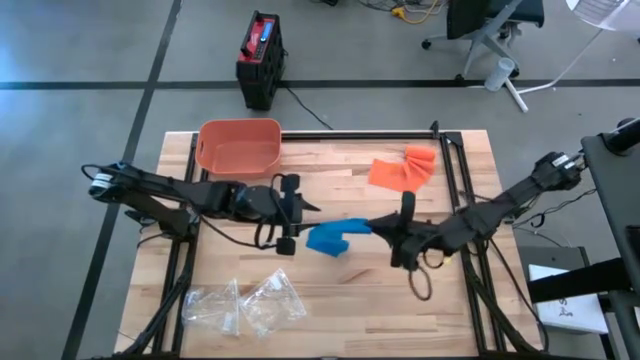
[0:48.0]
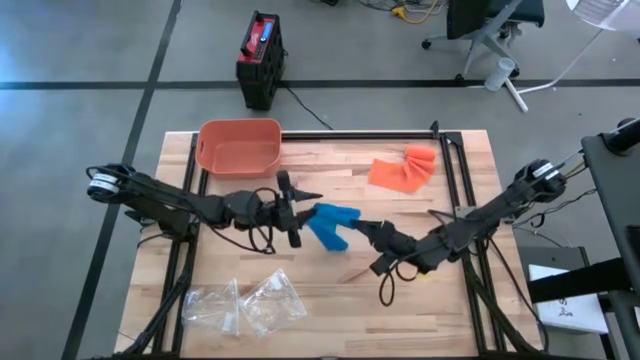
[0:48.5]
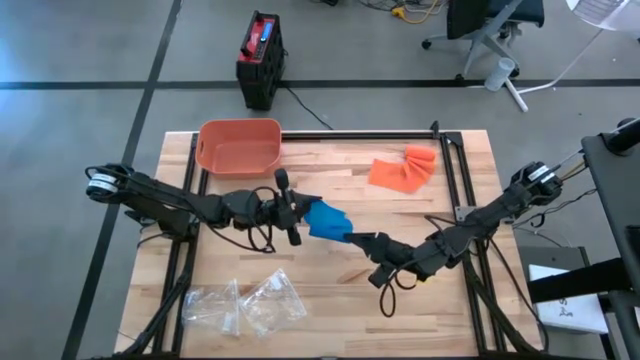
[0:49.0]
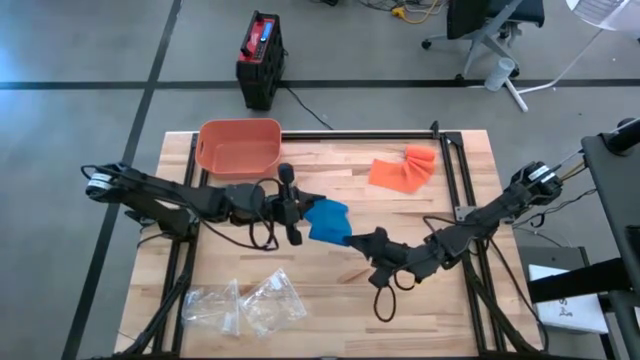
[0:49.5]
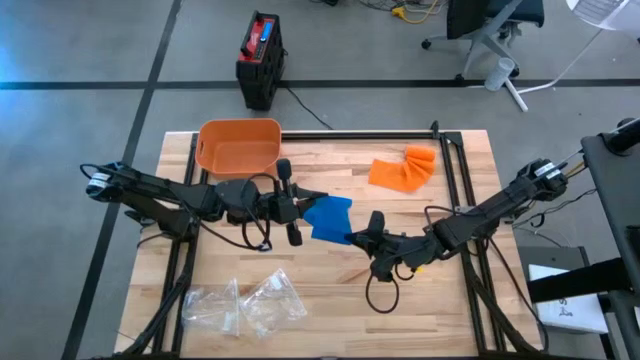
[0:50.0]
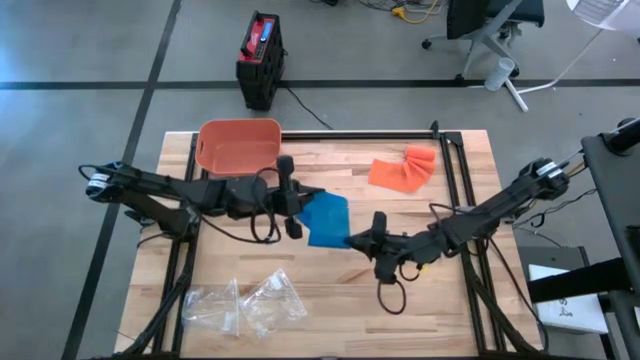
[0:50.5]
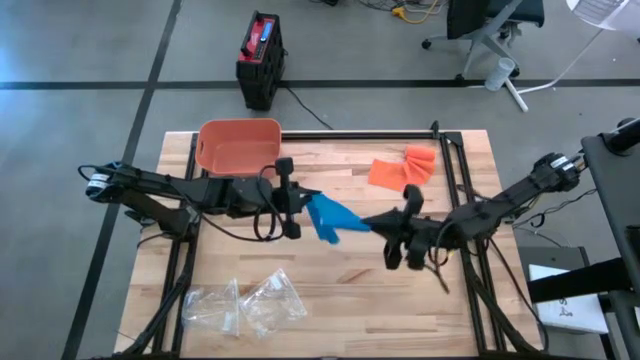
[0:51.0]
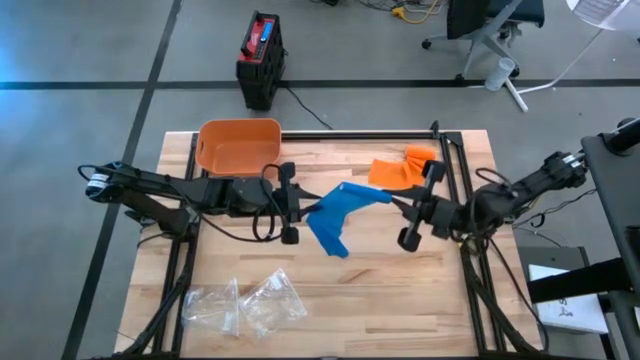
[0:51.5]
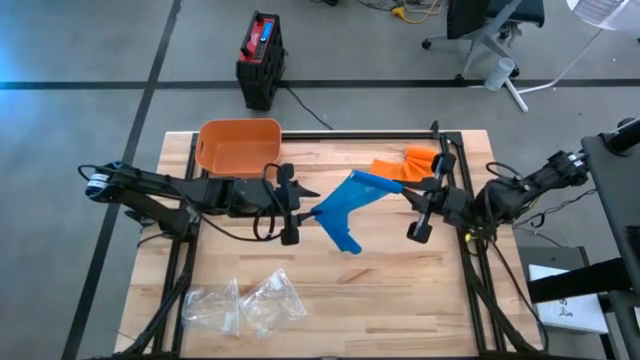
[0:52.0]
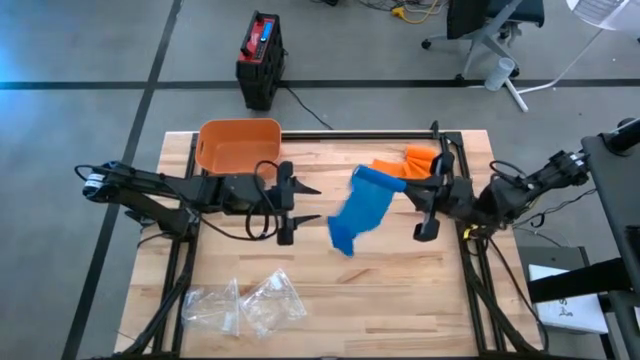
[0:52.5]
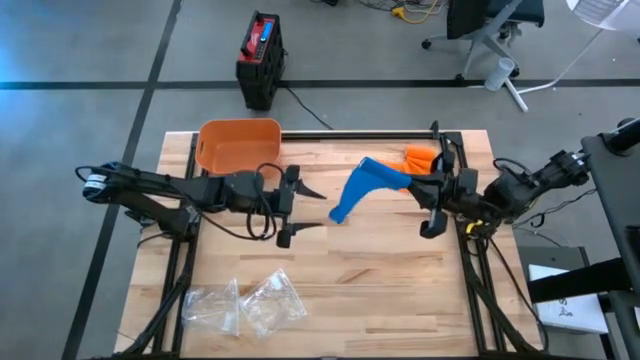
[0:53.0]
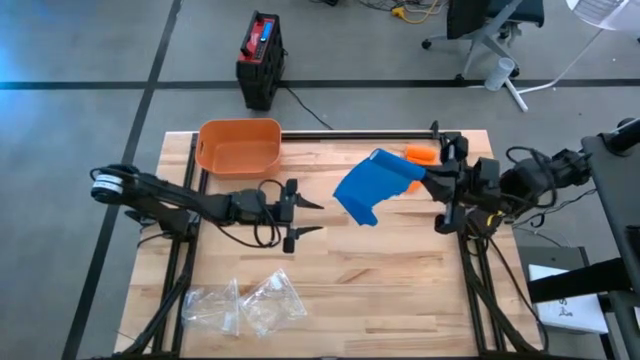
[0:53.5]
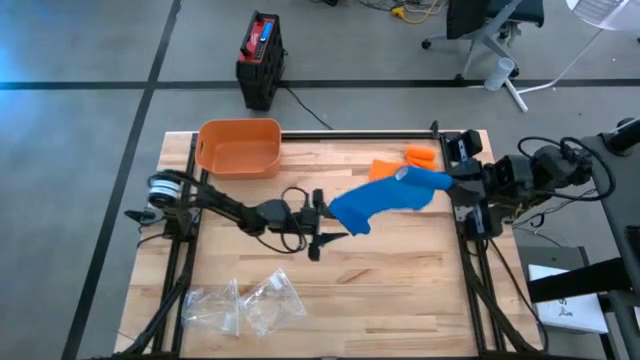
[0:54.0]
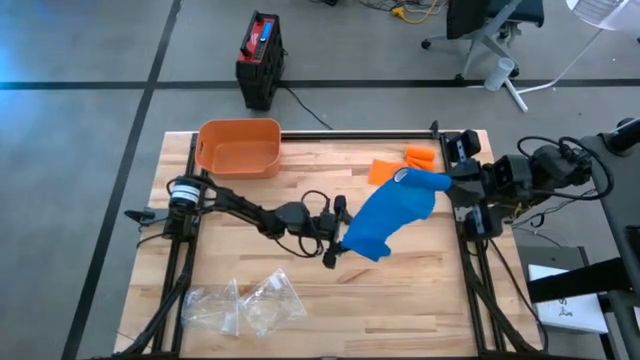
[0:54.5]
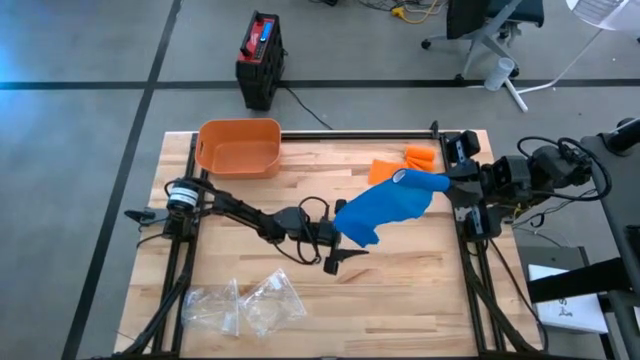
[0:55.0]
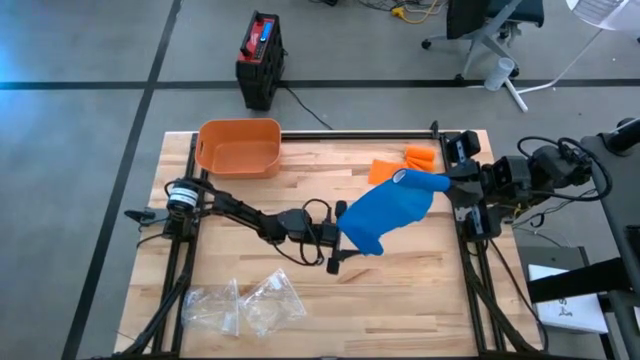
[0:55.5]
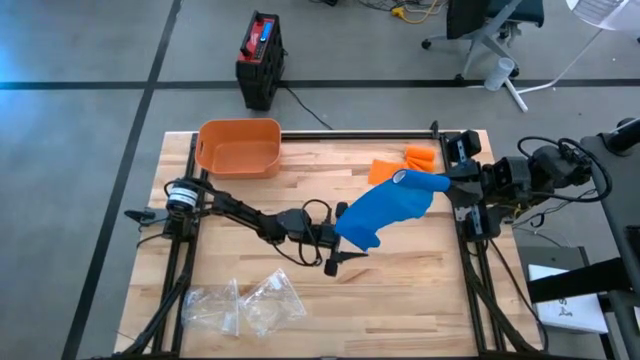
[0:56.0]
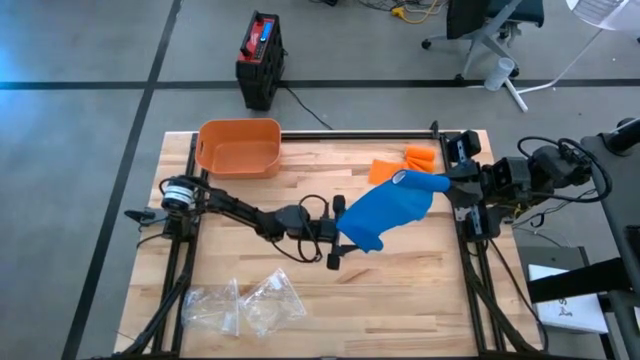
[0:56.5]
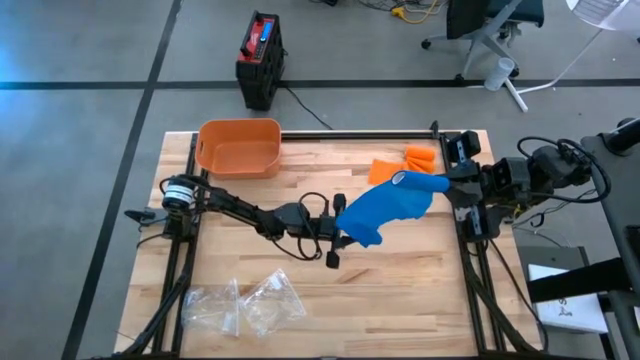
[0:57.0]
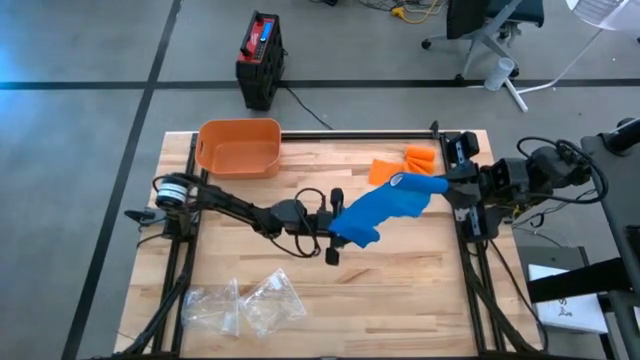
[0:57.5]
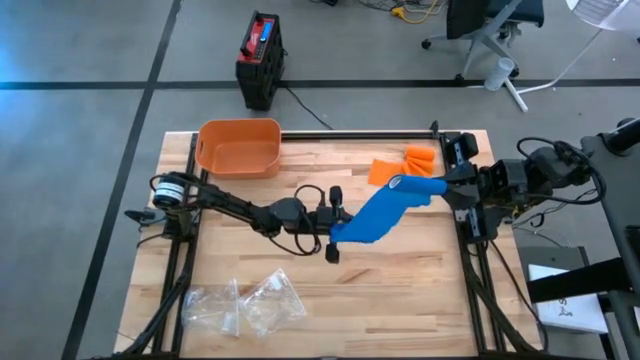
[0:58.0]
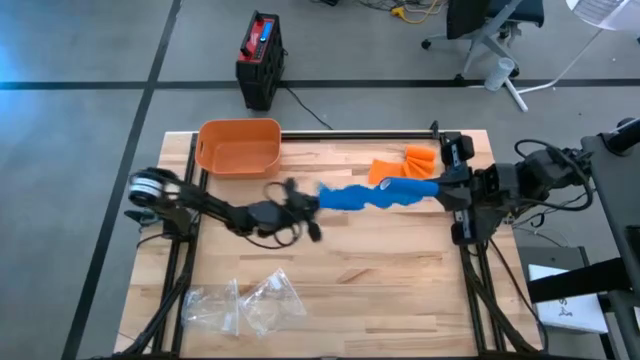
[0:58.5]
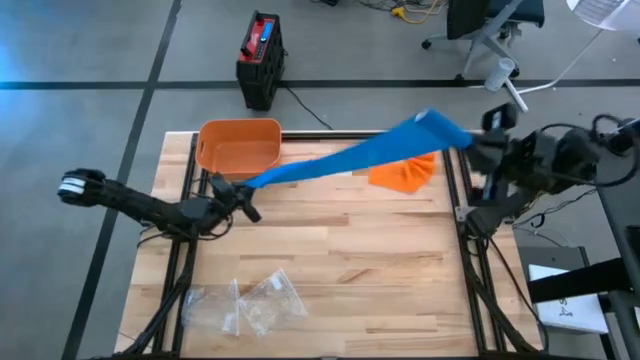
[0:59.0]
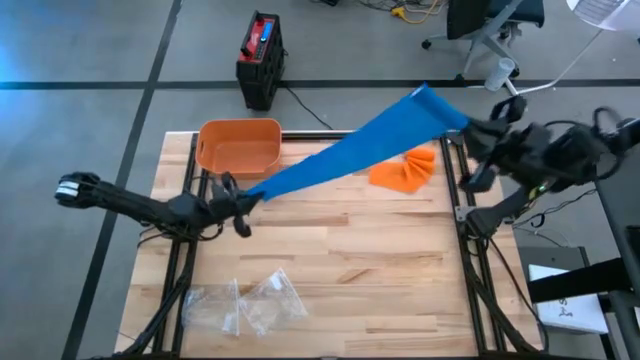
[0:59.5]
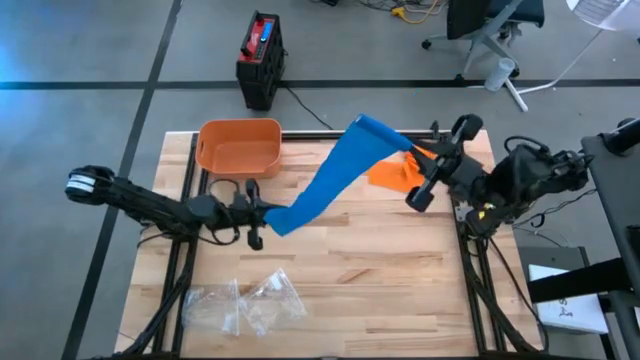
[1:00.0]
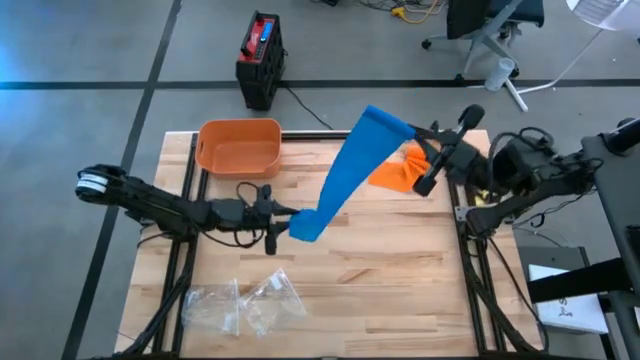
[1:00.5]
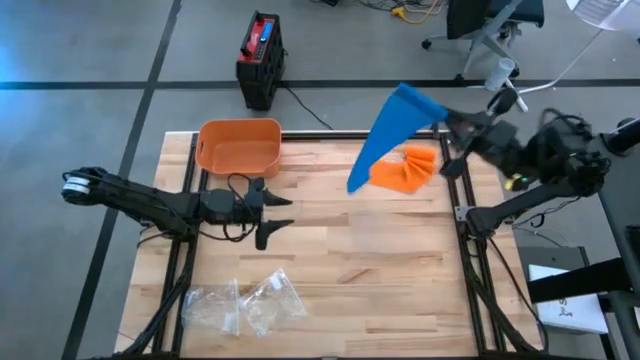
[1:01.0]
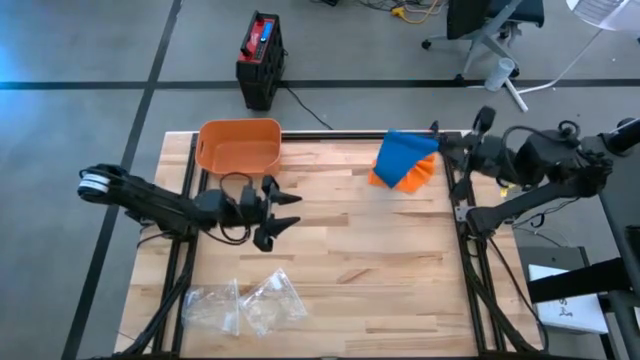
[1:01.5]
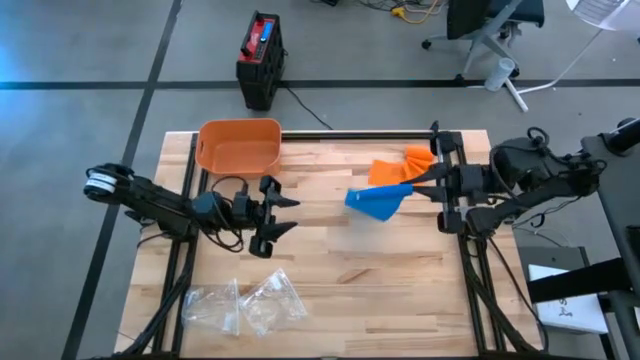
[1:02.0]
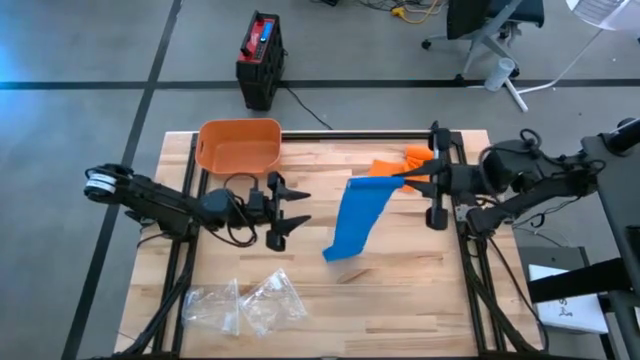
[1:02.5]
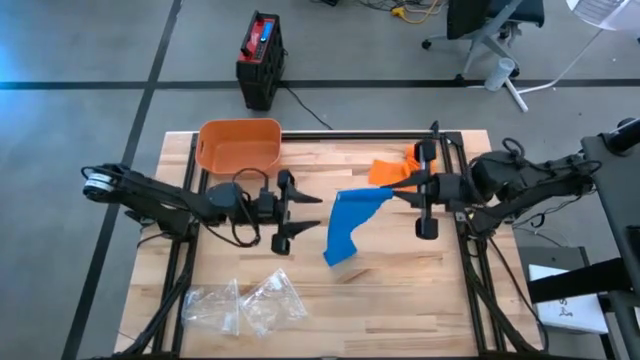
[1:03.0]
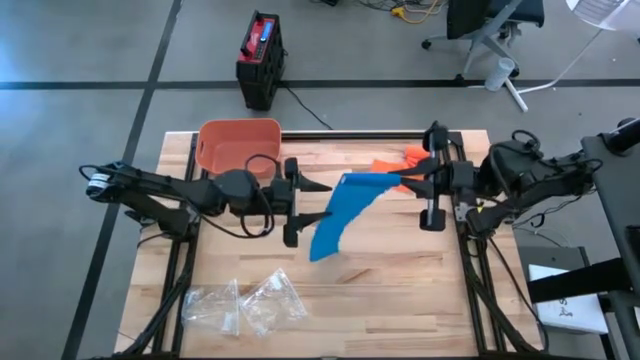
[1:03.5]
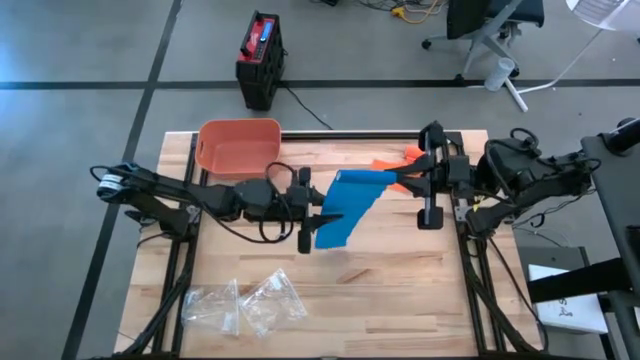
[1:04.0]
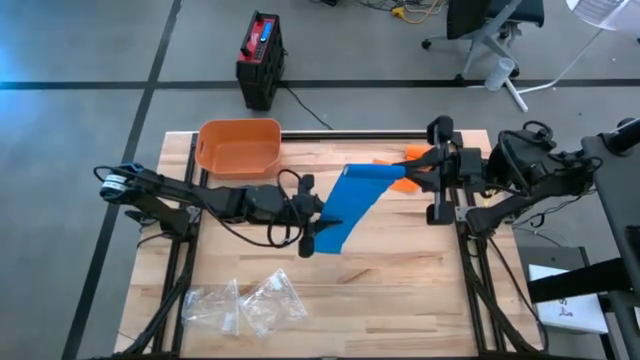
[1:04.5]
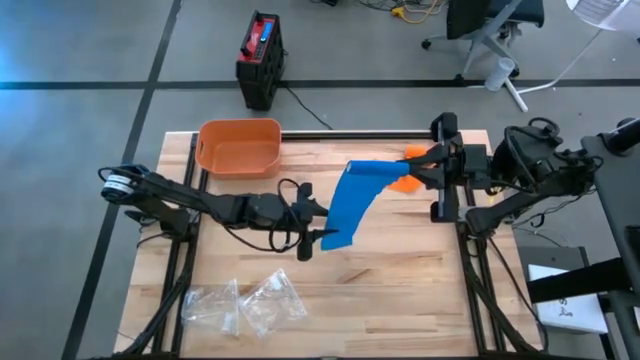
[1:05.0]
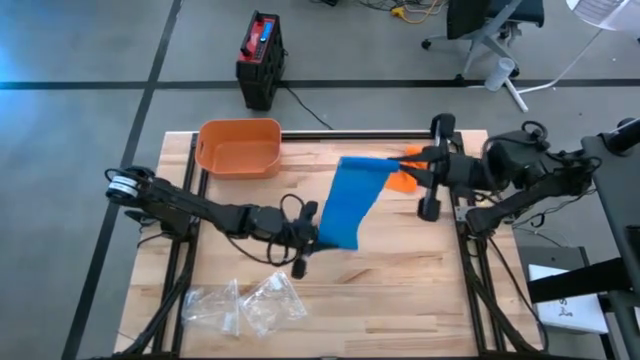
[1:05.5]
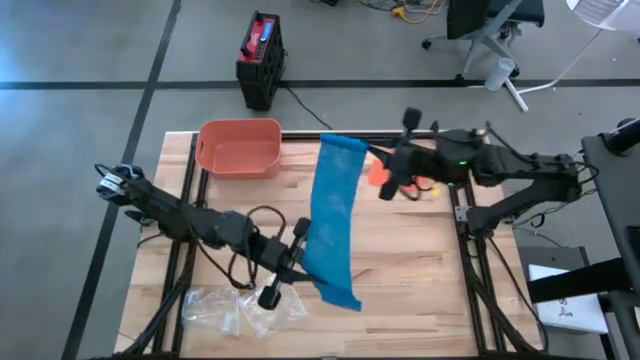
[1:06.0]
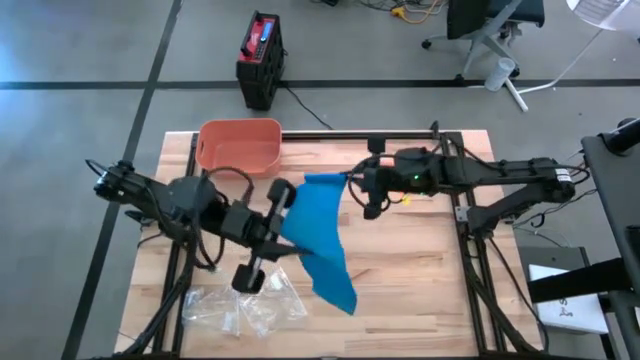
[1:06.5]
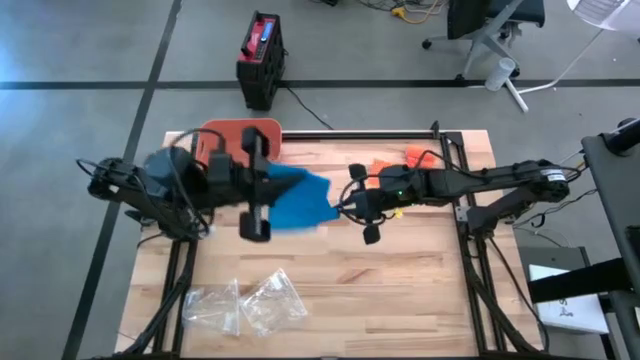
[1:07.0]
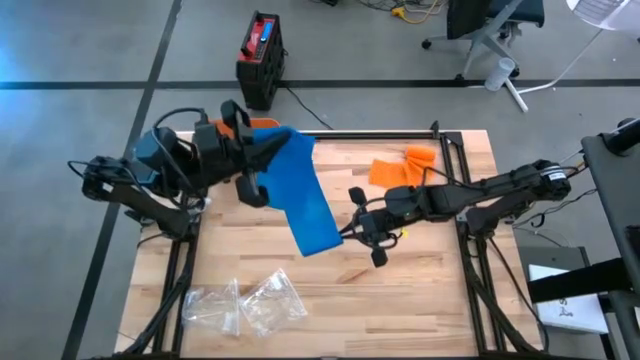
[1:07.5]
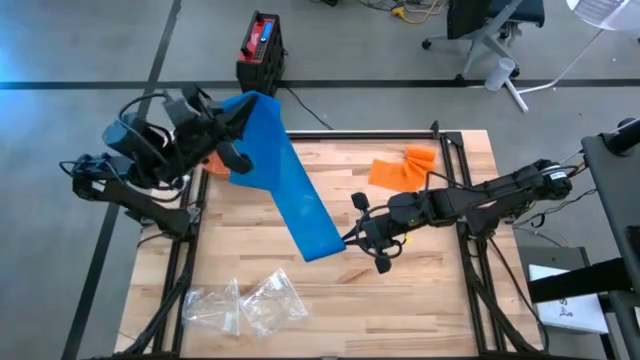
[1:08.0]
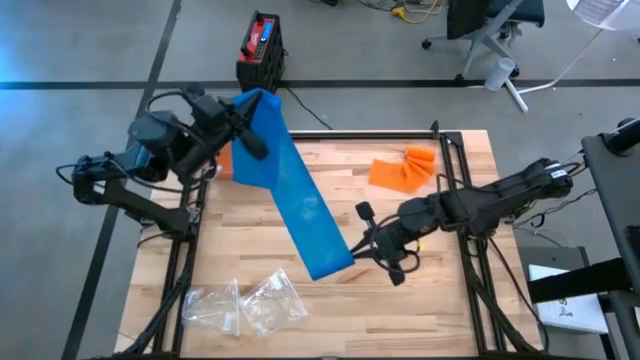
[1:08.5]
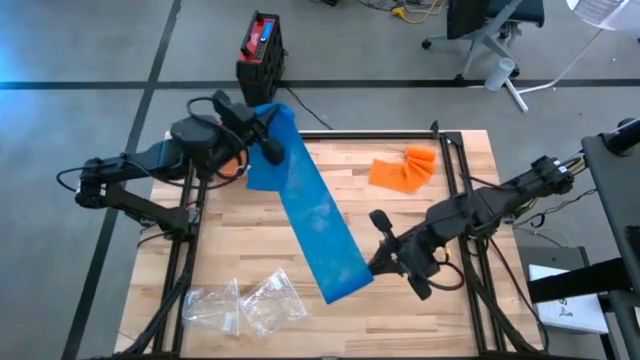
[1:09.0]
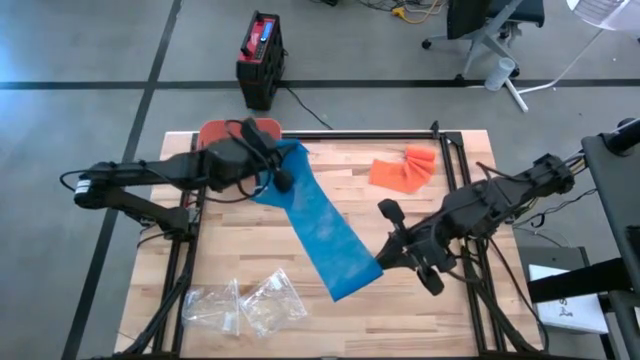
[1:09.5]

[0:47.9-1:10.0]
Task: Roll bandage
Roll the blue bandage

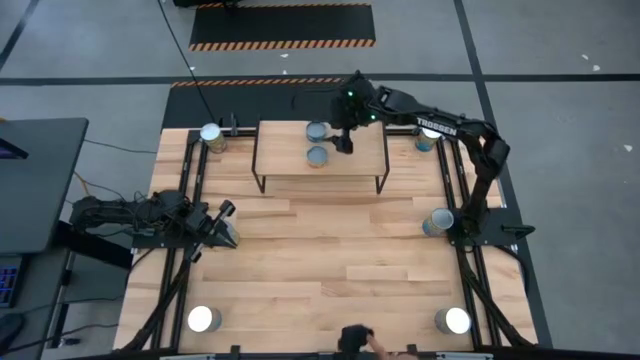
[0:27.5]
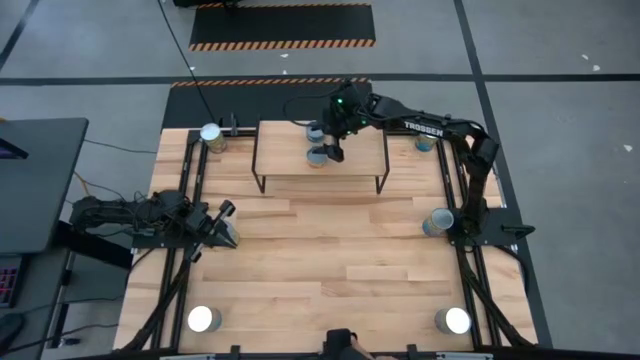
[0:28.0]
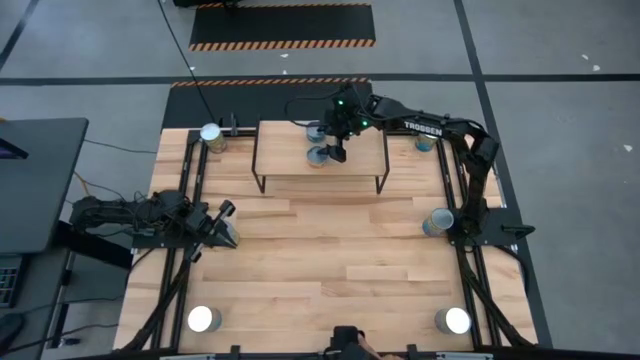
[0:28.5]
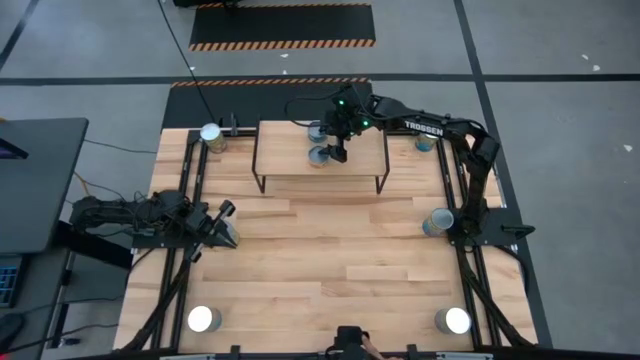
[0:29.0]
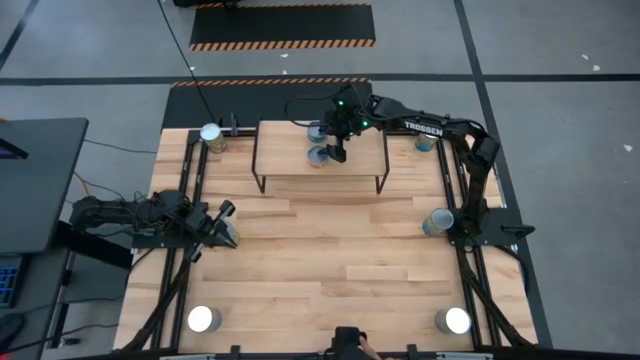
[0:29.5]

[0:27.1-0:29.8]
Task: Pick and place cans onto a shelf
Adjust the small cans on the shelf
